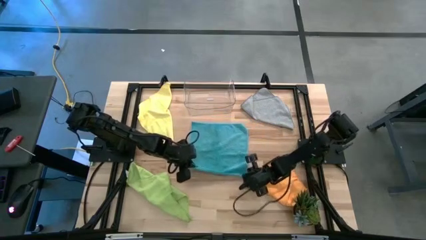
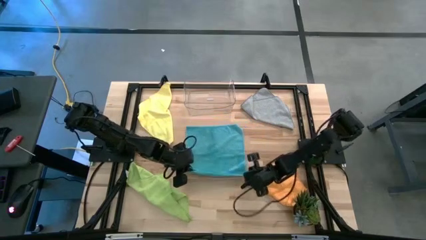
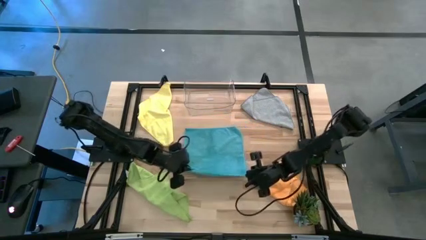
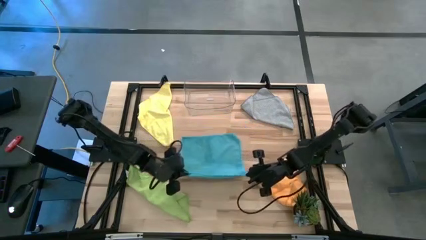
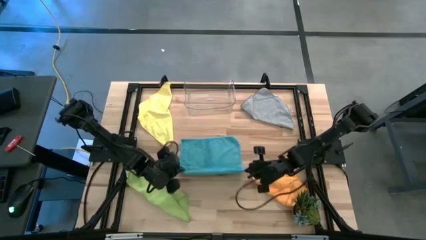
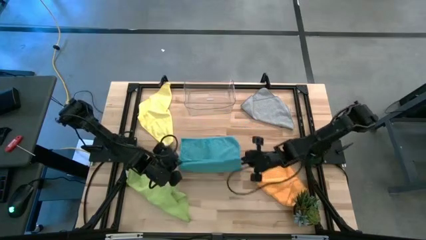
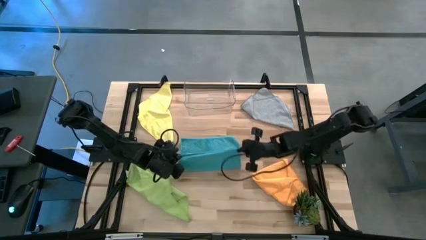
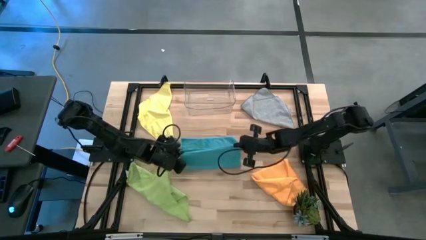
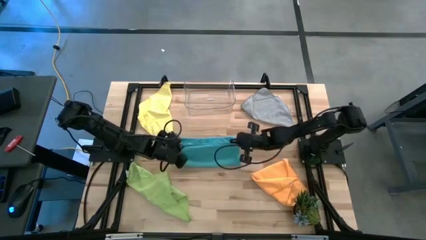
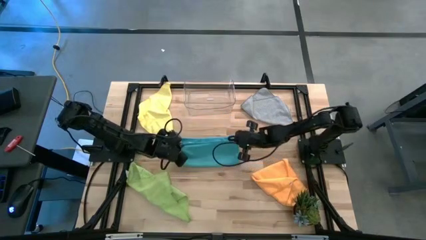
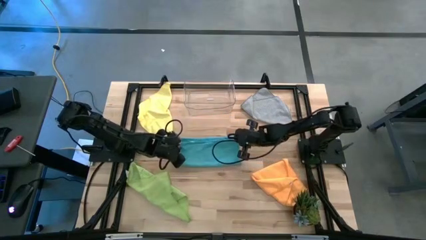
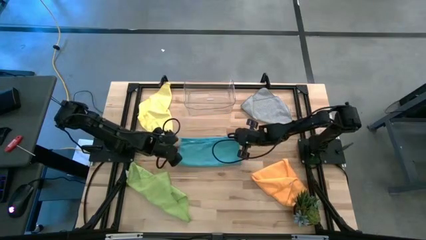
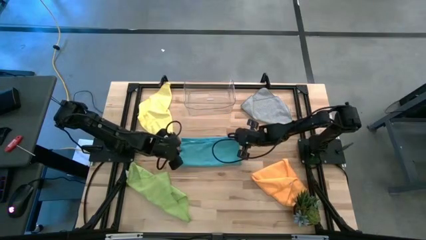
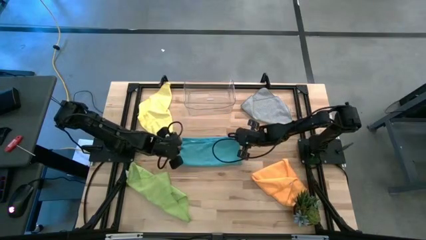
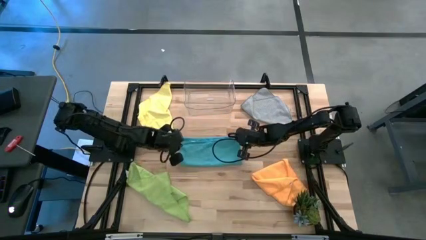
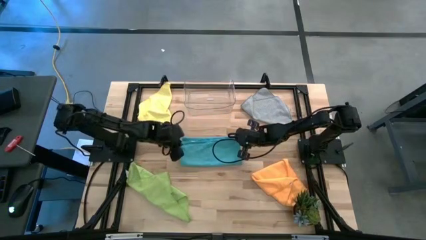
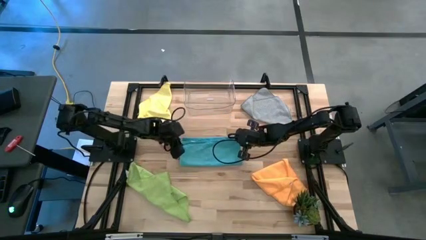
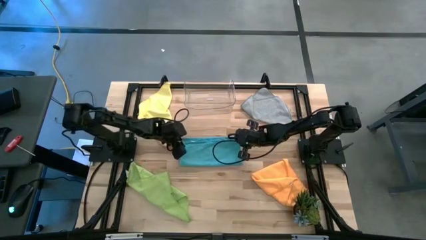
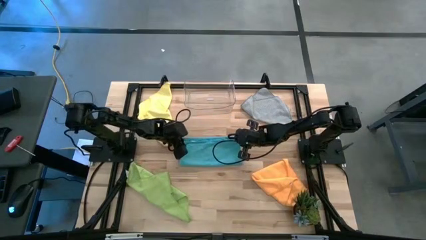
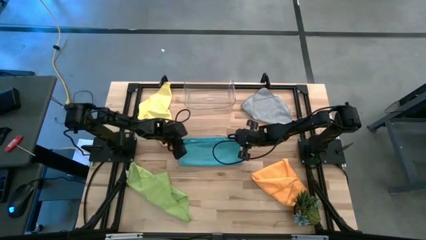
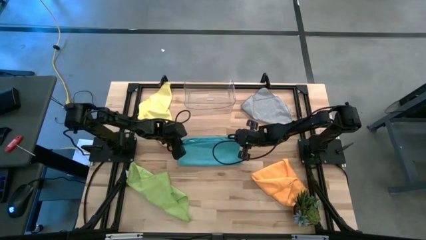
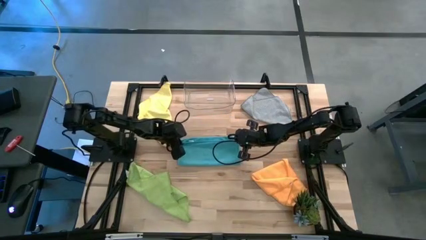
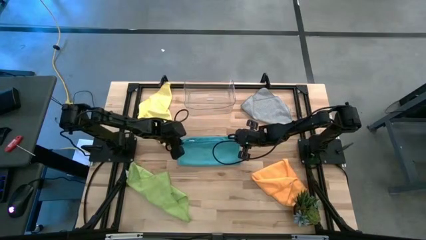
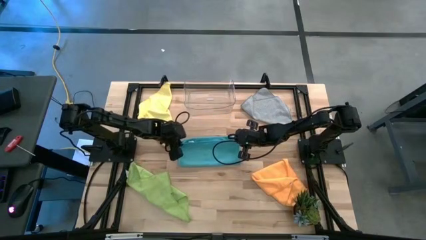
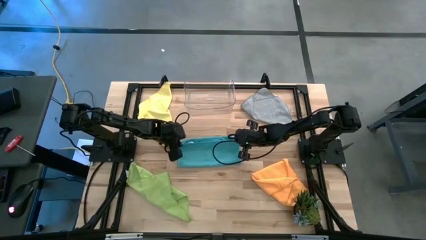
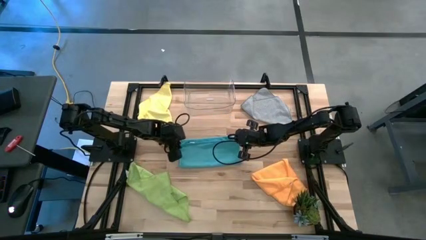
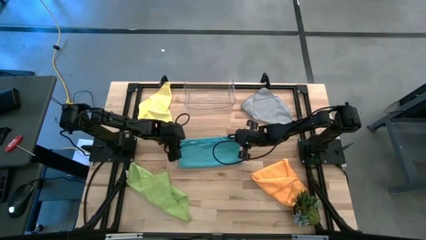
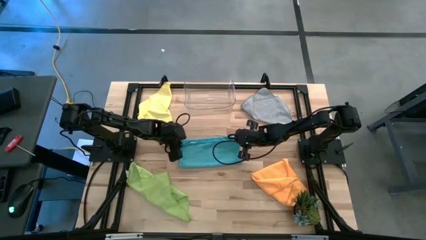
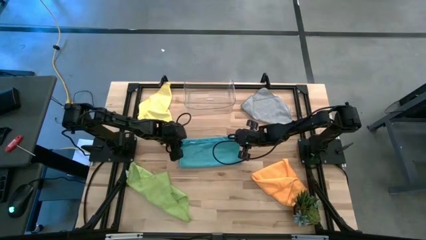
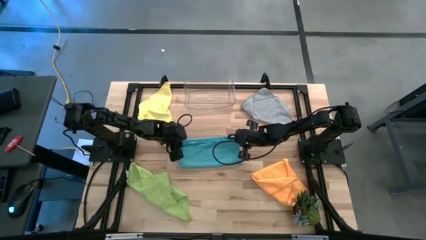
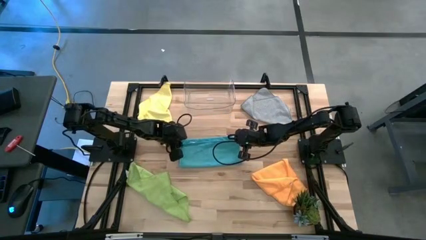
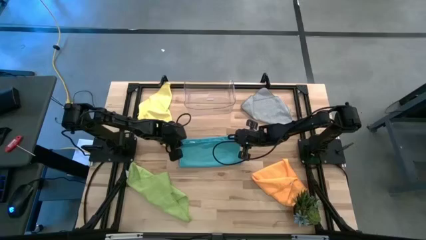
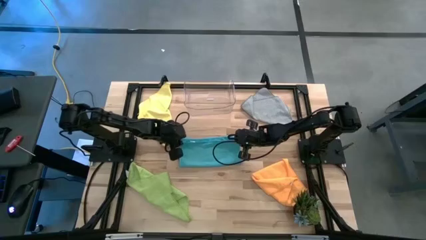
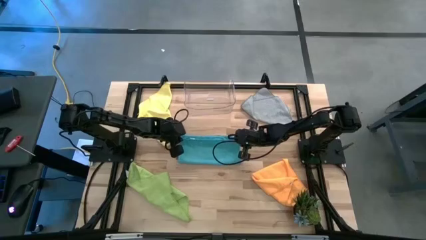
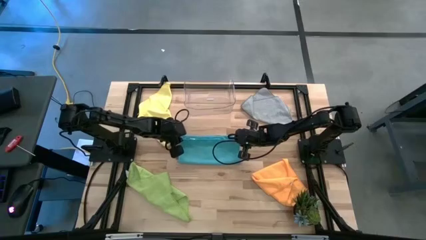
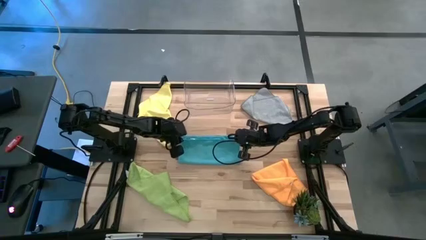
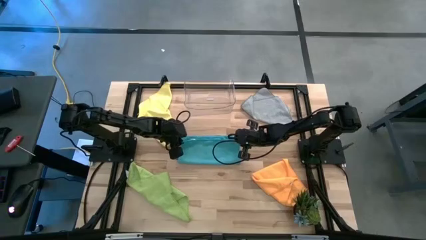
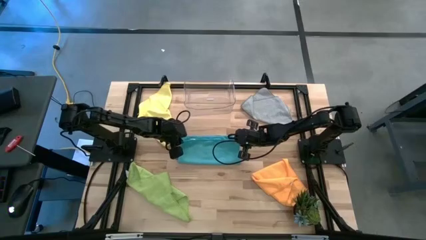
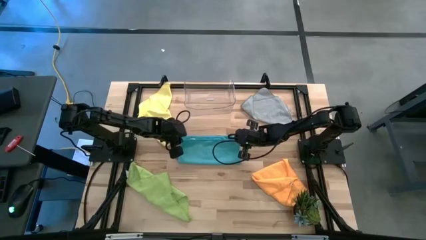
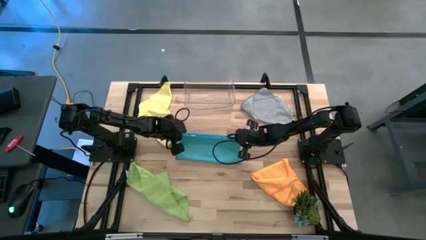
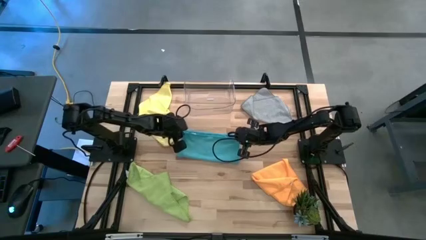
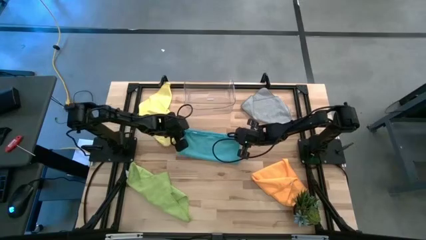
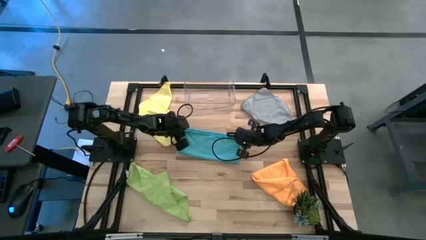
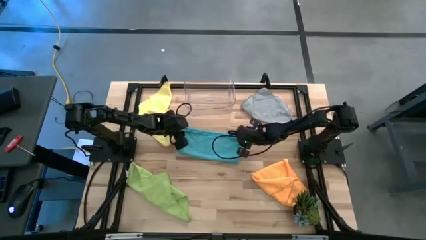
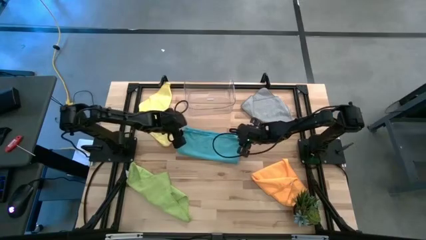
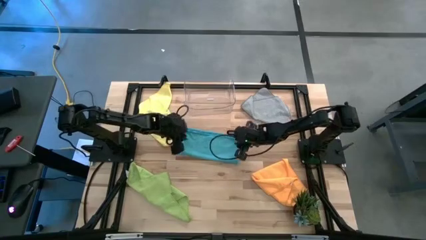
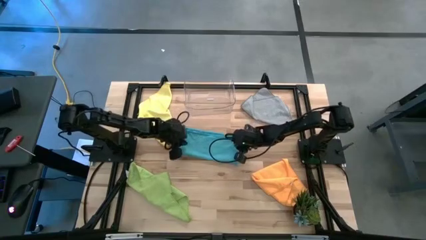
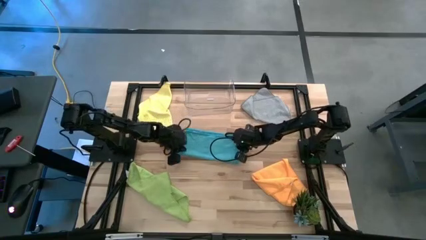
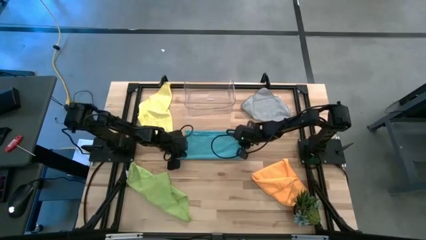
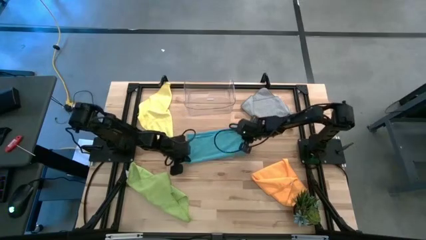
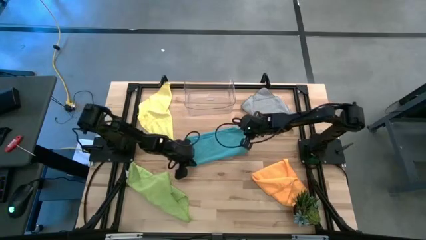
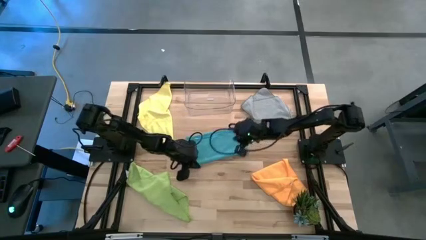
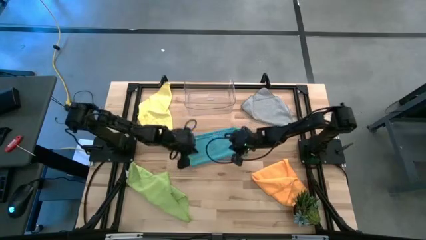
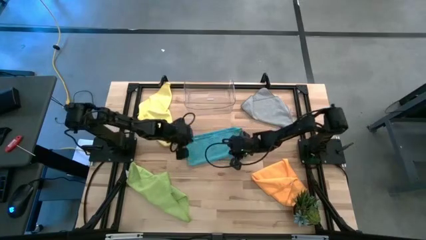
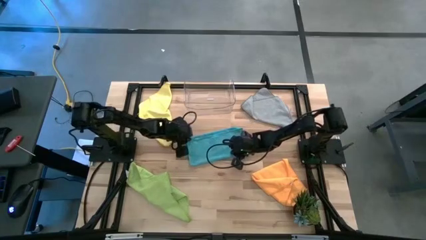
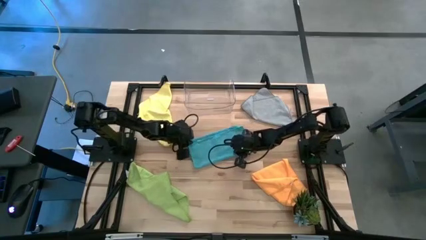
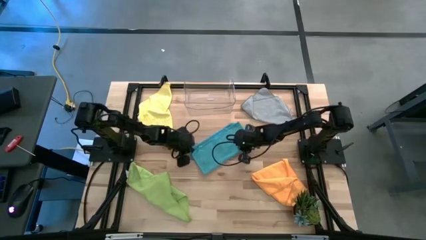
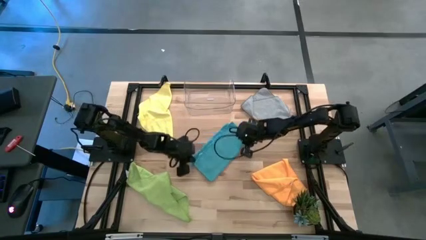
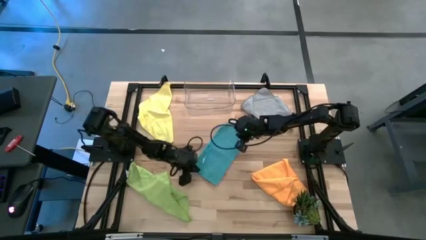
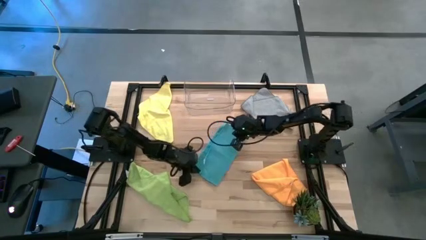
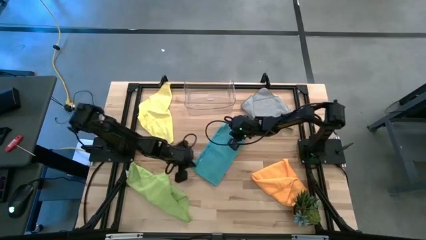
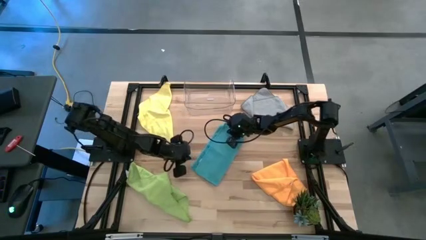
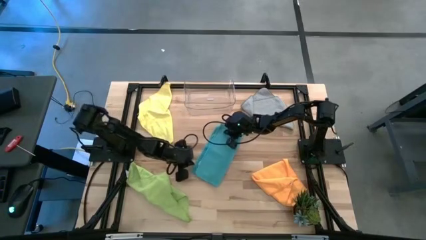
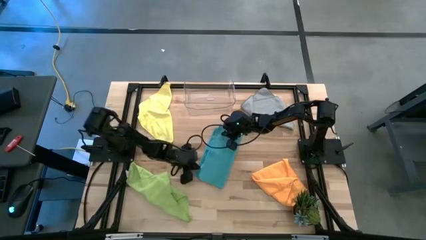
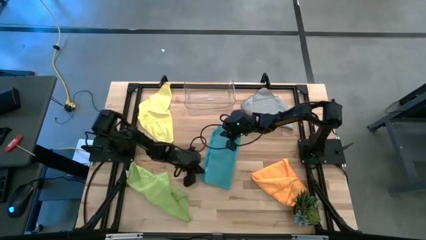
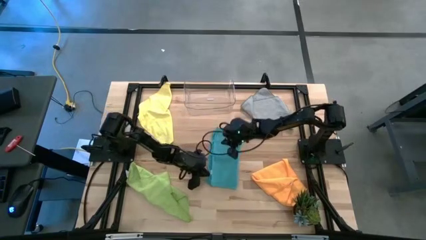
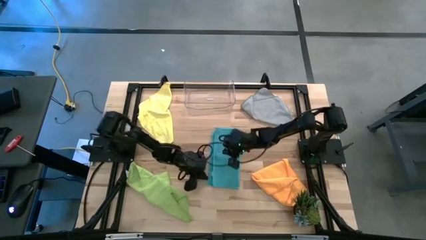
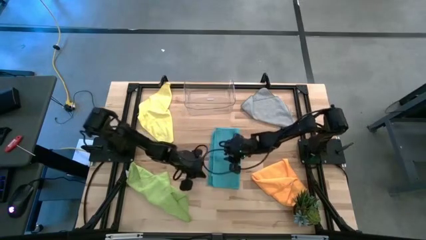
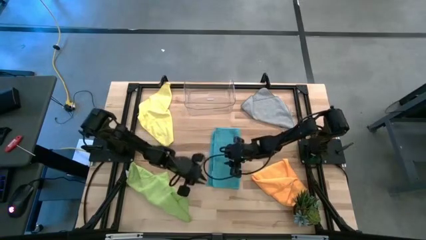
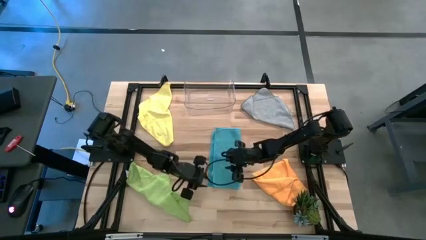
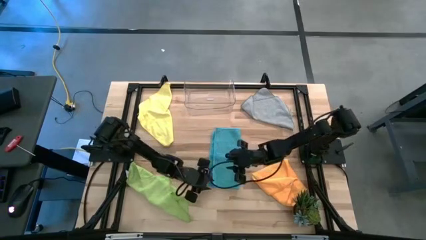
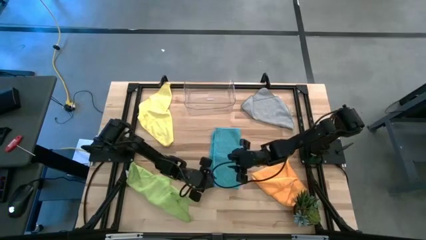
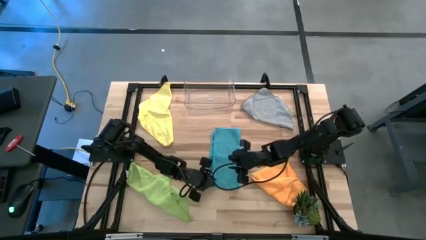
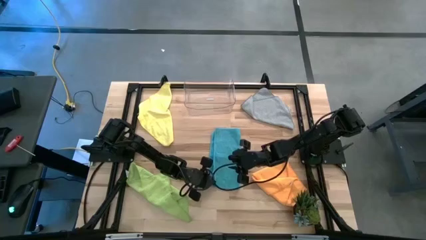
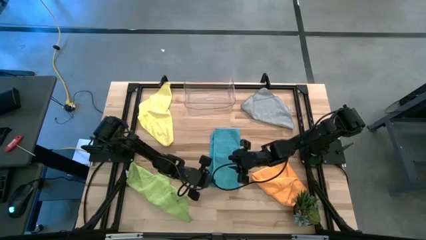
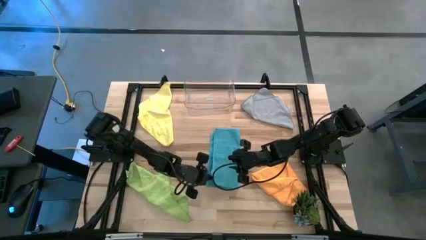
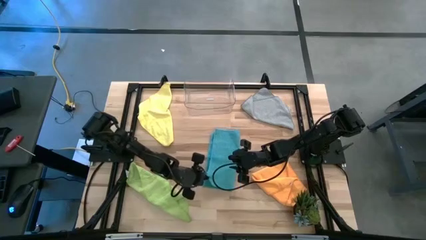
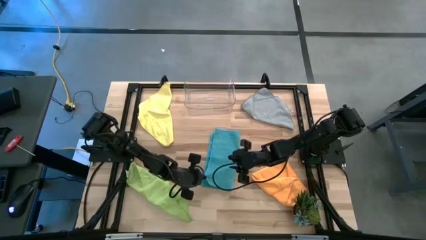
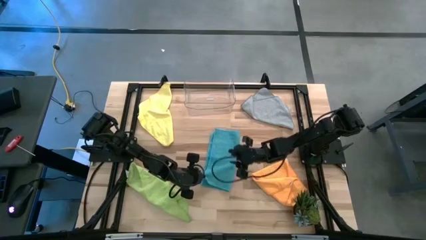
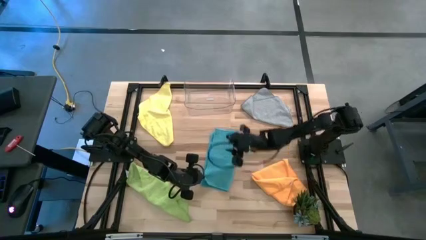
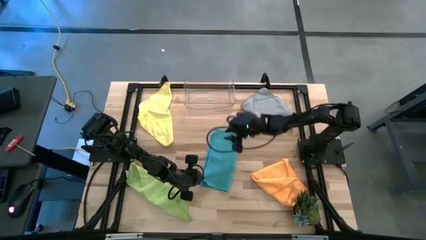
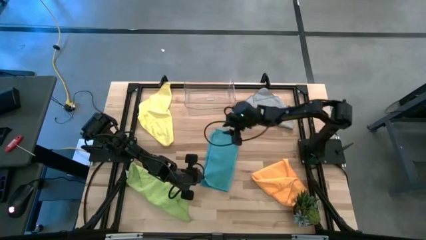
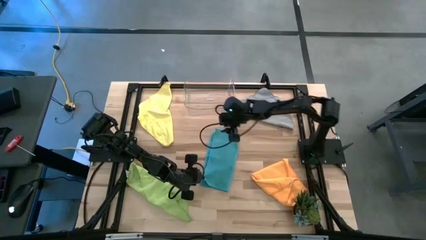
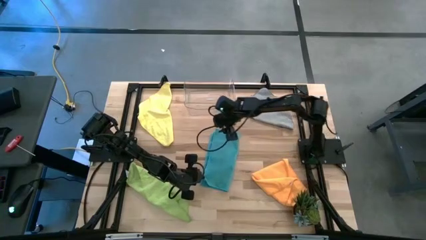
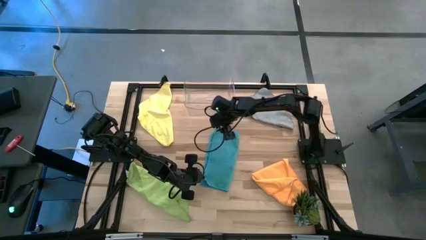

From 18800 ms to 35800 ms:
Task: Fold microfiber towels
Fold the blue towel
